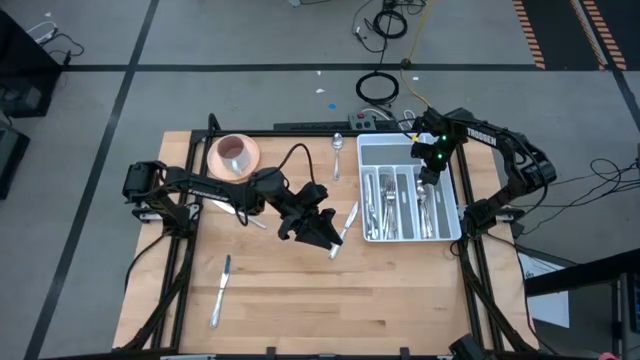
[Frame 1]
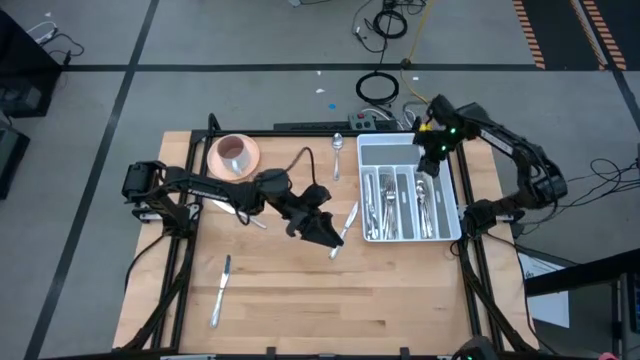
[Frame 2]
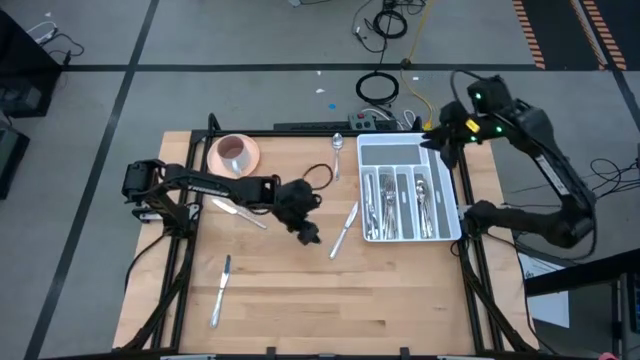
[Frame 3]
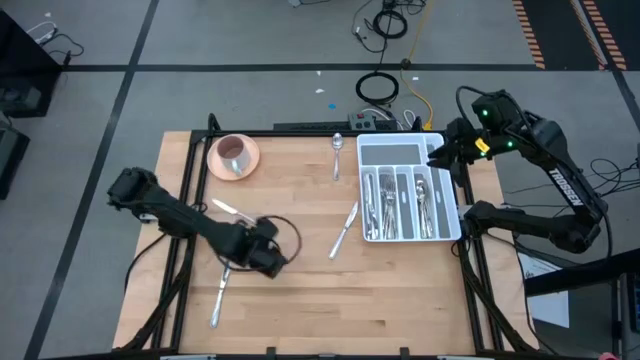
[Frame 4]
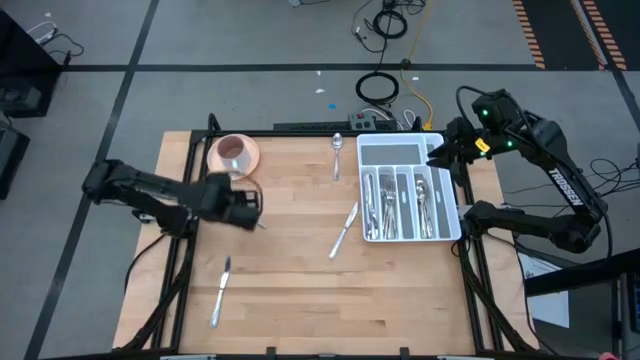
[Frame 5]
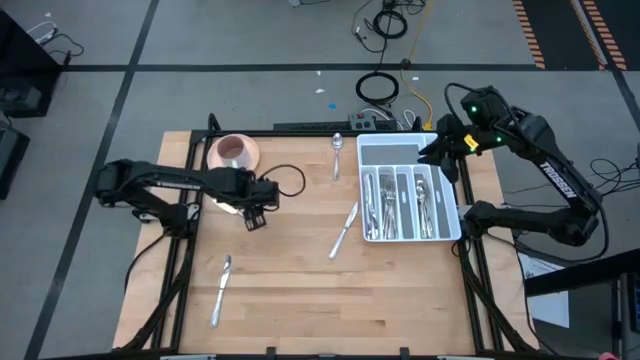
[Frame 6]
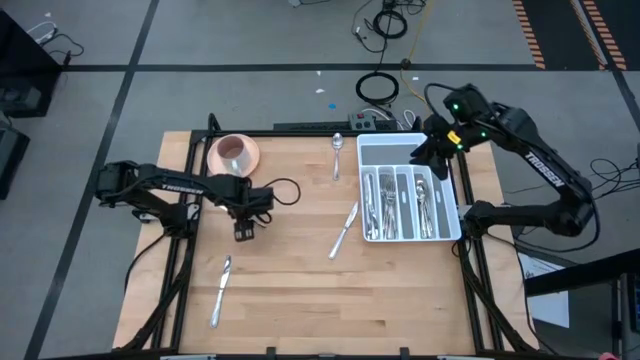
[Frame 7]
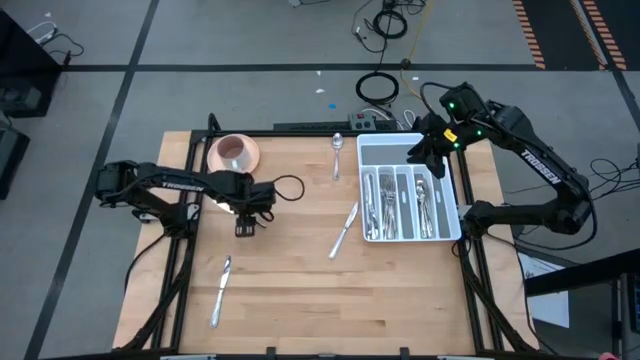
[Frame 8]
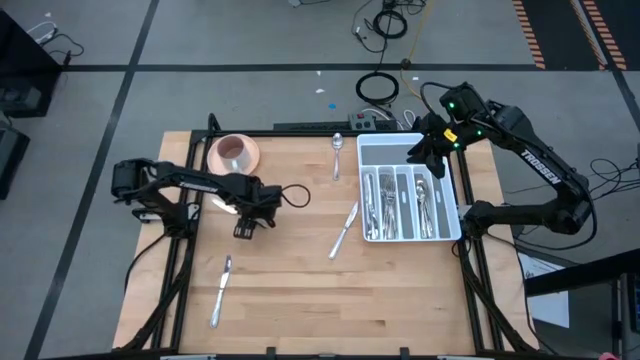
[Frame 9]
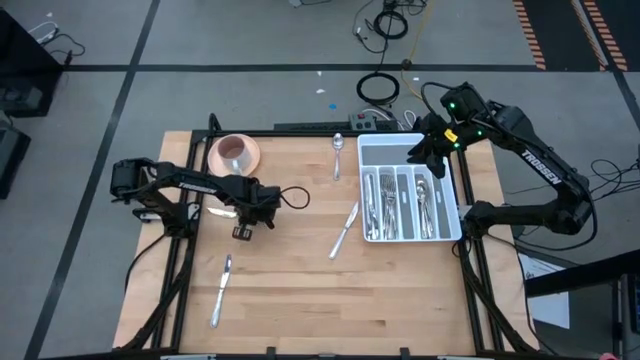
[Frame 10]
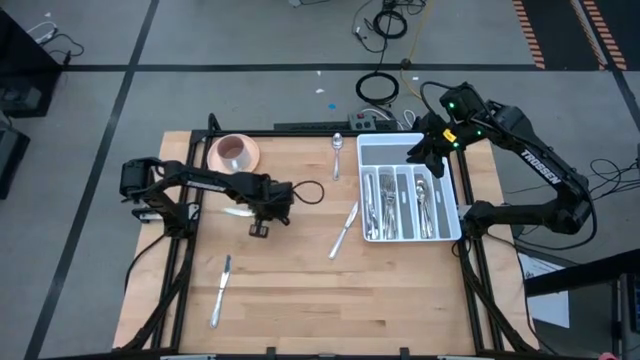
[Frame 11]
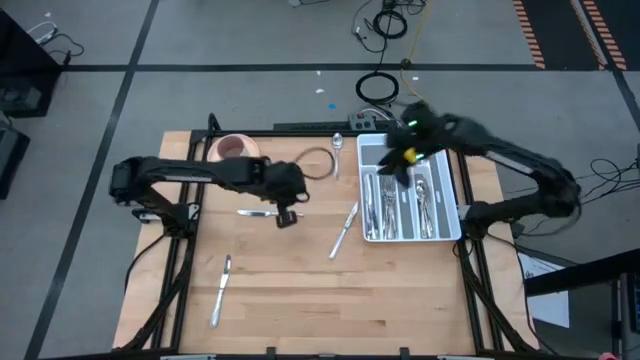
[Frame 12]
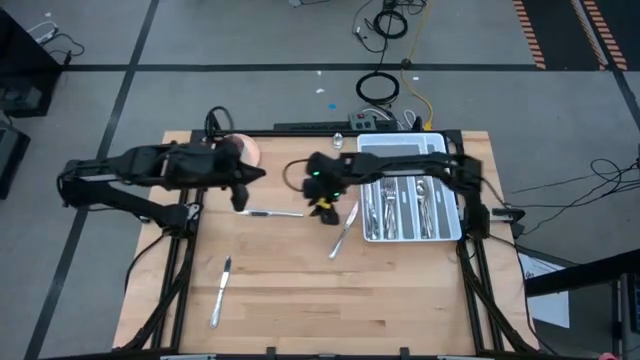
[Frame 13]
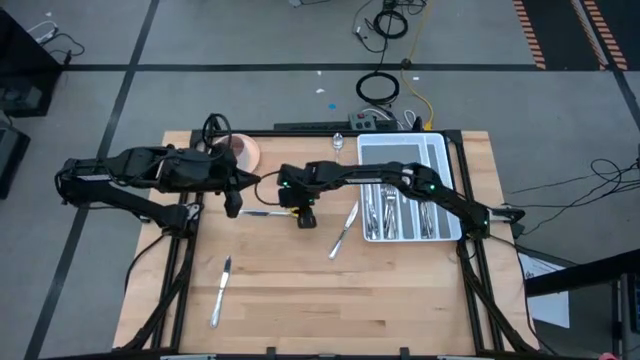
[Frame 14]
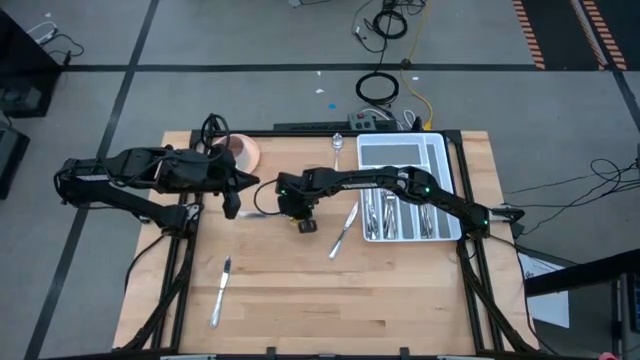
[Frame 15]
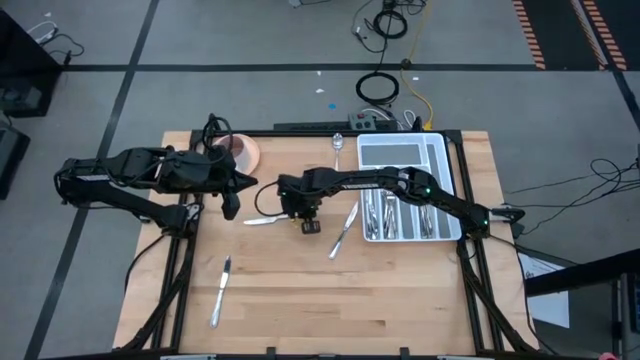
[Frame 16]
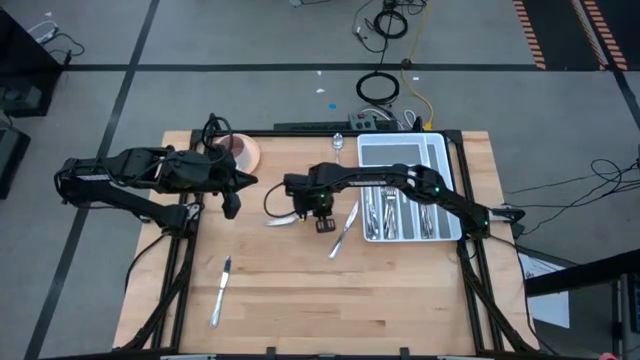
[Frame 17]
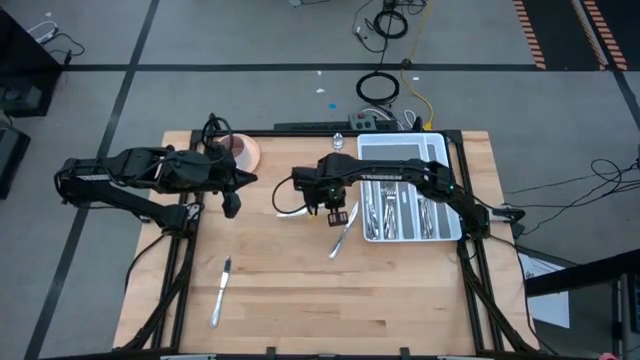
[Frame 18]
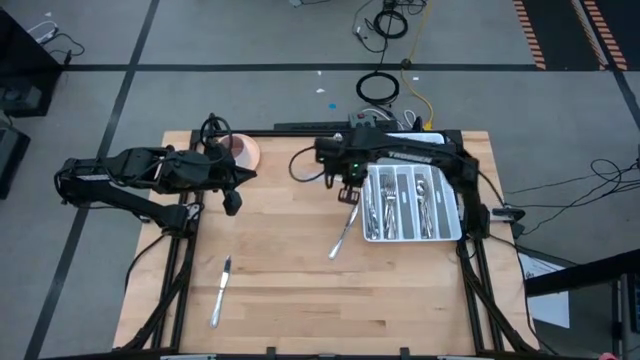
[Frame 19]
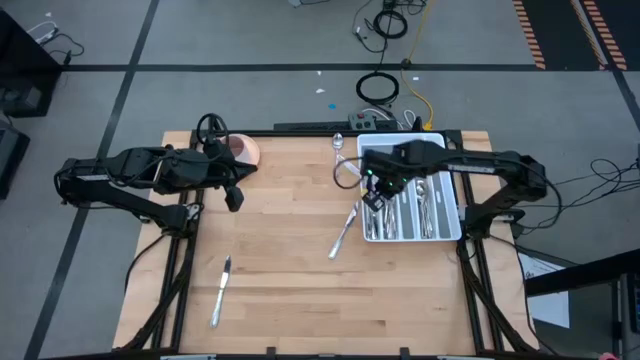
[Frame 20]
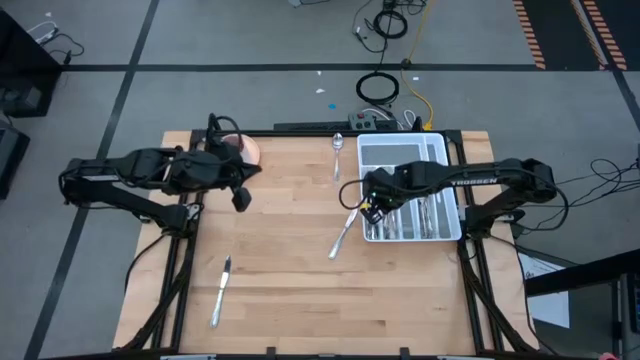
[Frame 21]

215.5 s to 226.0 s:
Task: Sort silverware
Put the silver table knife into the silverware rack

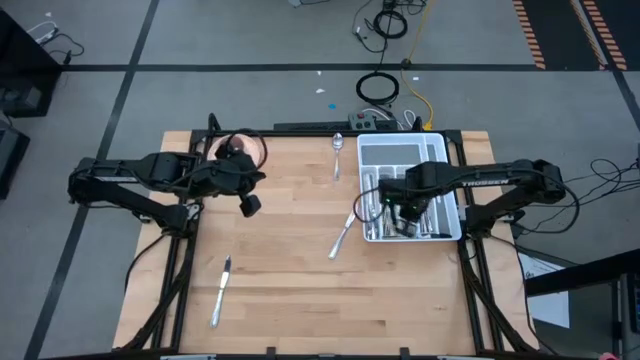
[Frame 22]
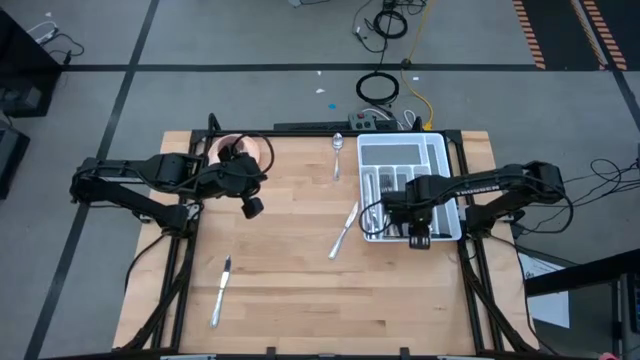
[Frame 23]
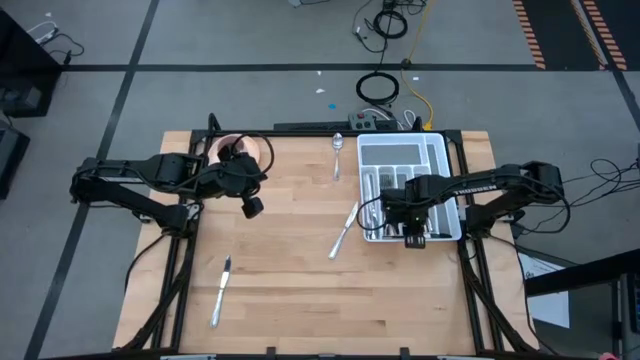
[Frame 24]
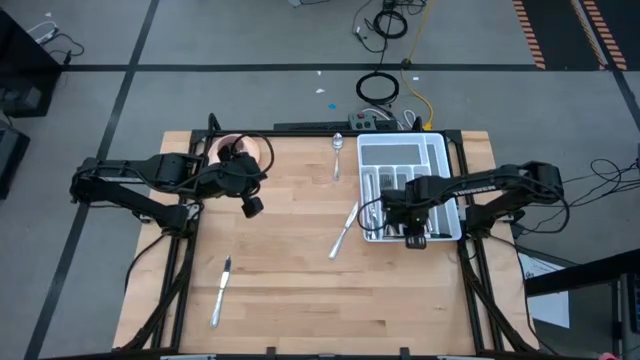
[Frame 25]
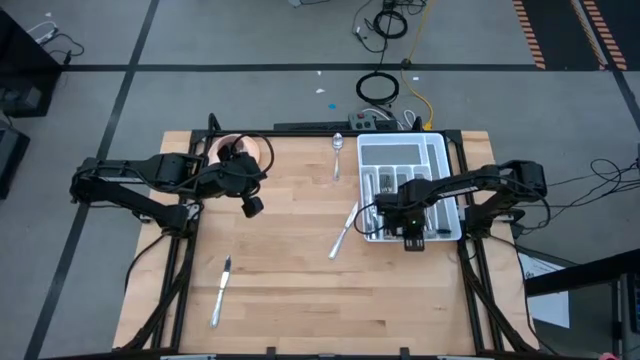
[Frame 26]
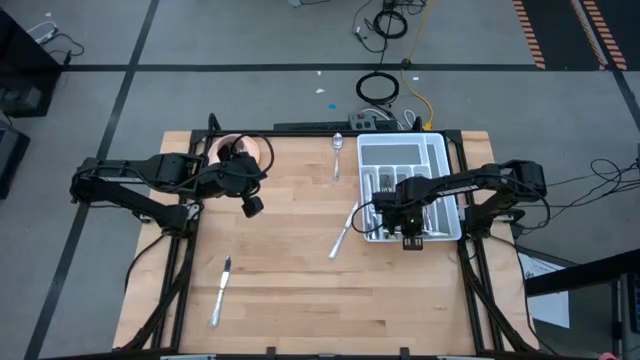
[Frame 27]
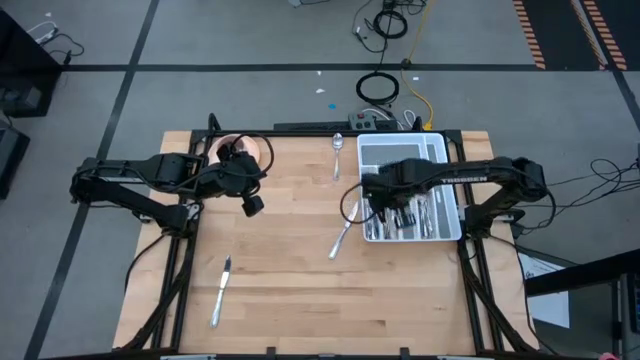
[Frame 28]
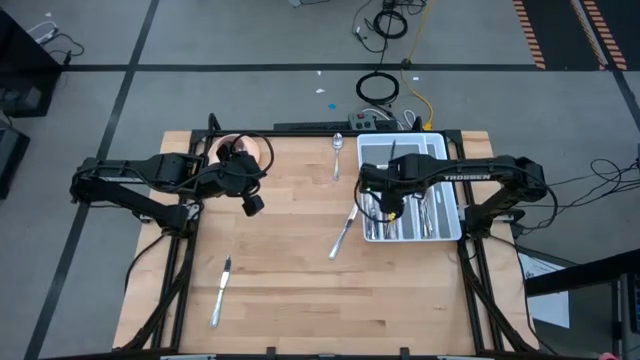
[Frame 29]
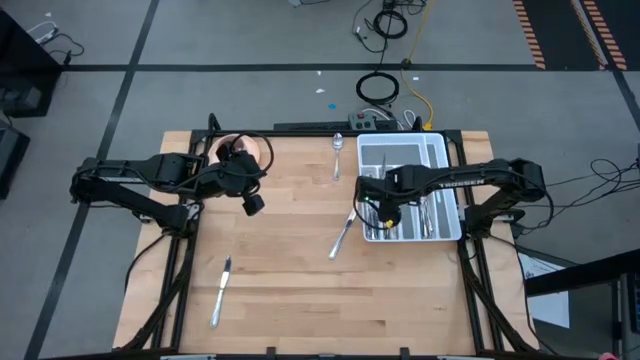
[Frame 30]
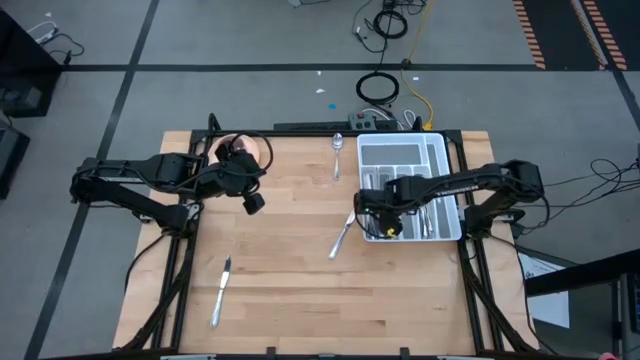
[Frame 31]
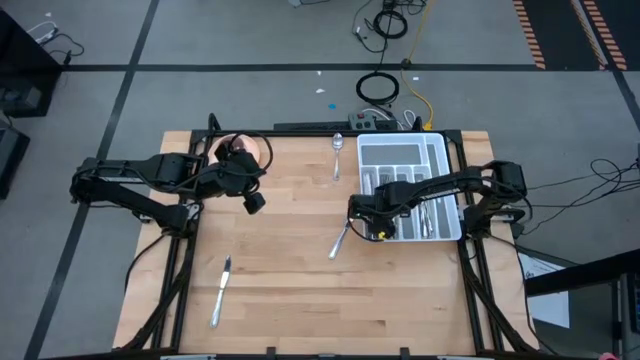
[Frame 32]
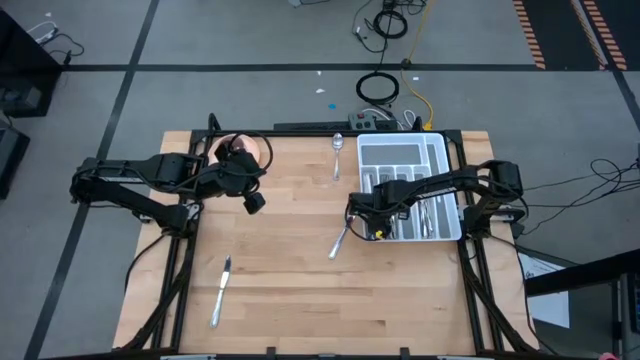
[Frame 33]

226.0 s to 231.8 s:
Put the silver table knife into the silverware rack

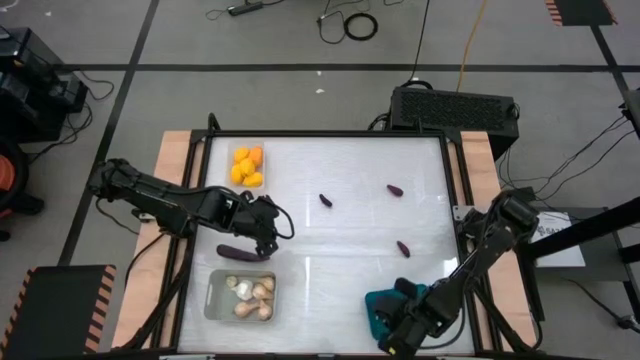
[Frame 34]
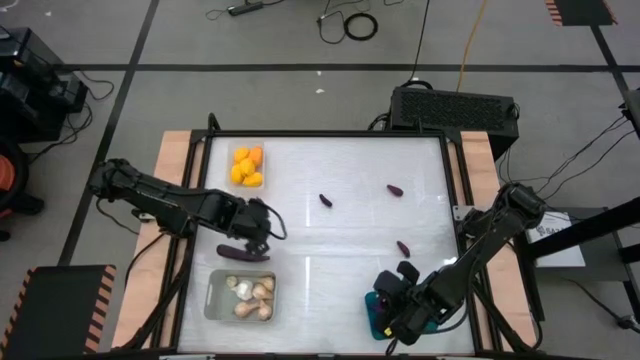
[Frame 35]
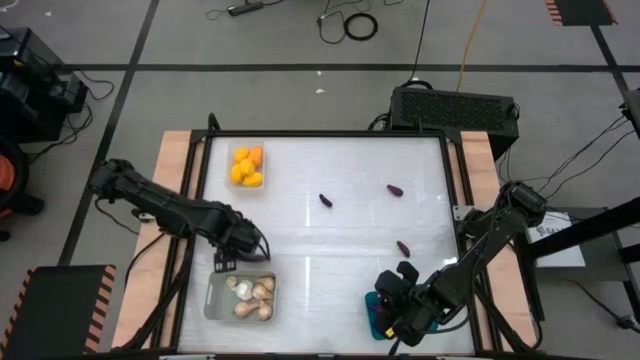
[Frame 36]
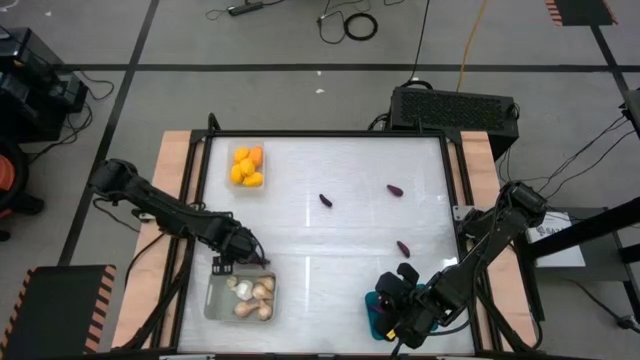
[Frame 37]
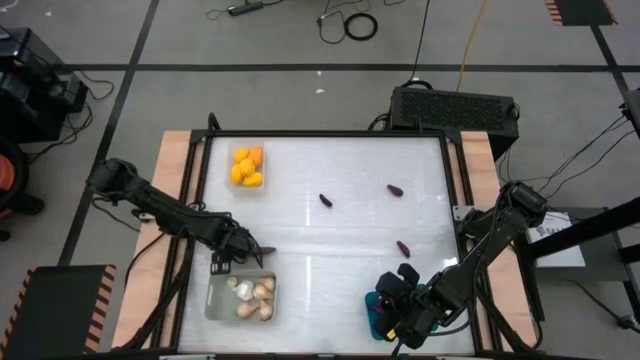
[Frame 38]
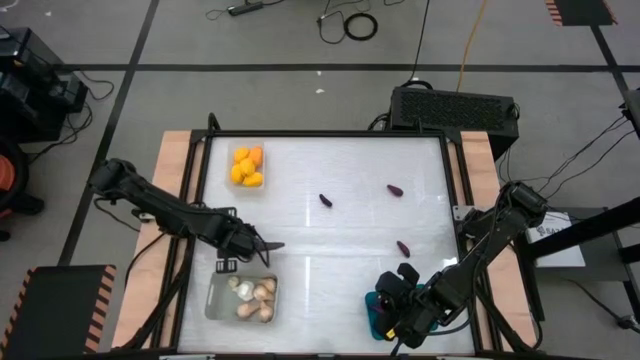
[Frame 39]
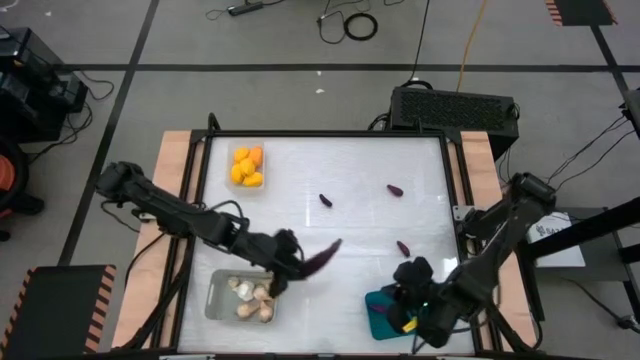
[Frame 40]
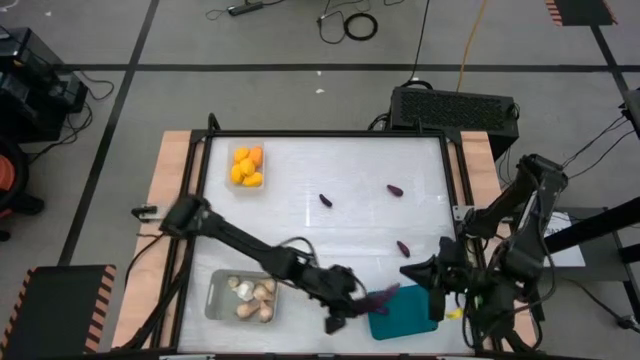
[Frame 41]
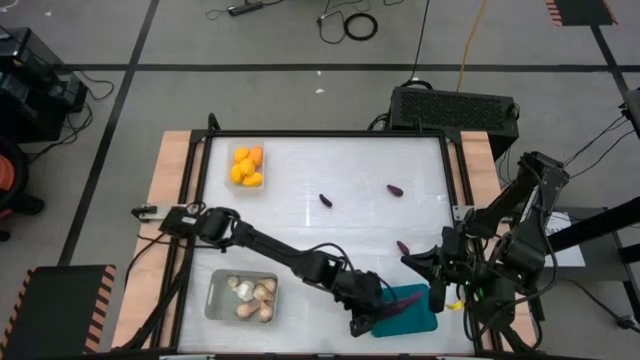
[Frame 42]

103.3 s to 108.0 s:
Task: Sort produce into baskets
Put the purple eggplant into the blue bin
